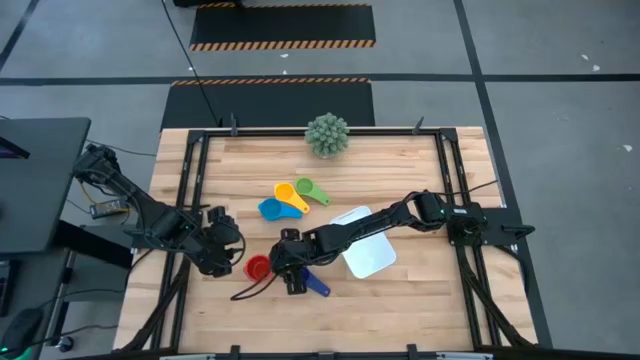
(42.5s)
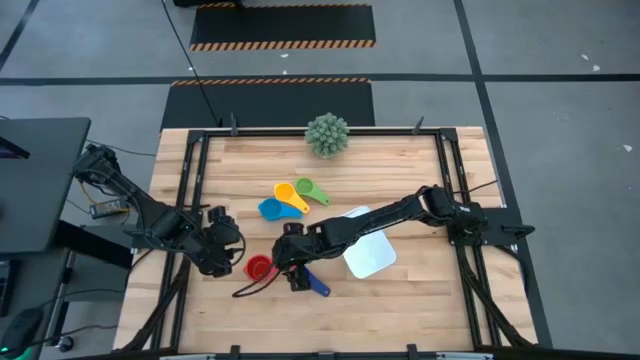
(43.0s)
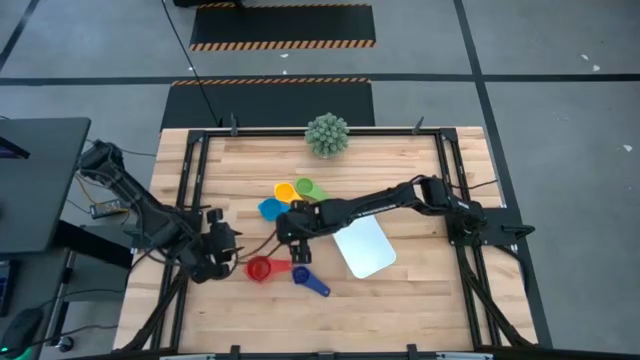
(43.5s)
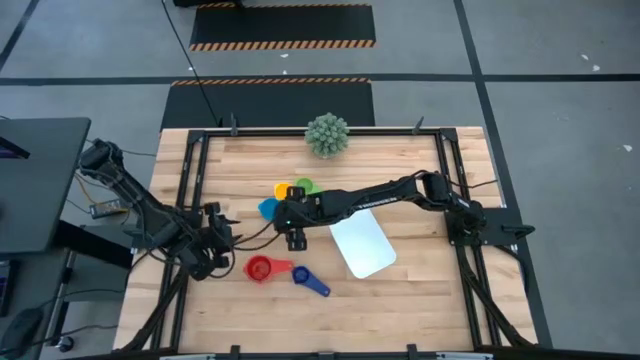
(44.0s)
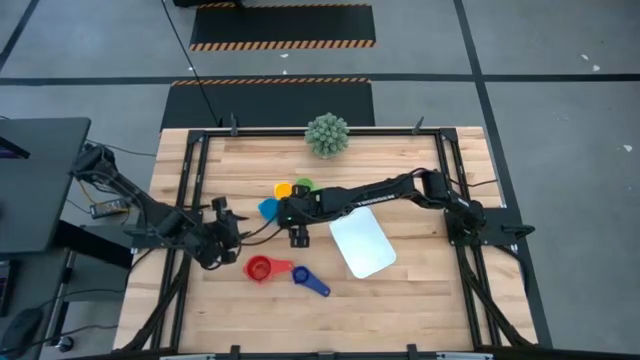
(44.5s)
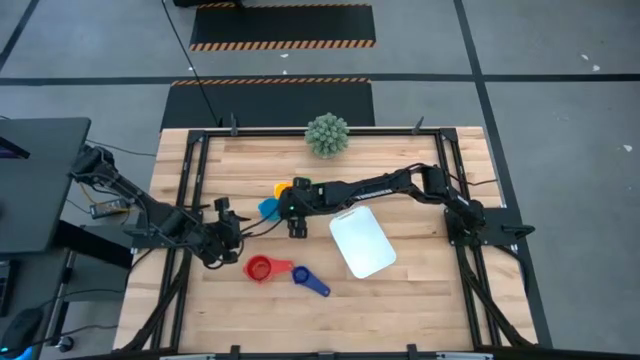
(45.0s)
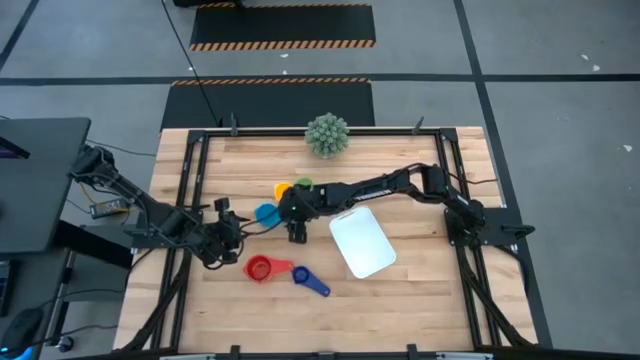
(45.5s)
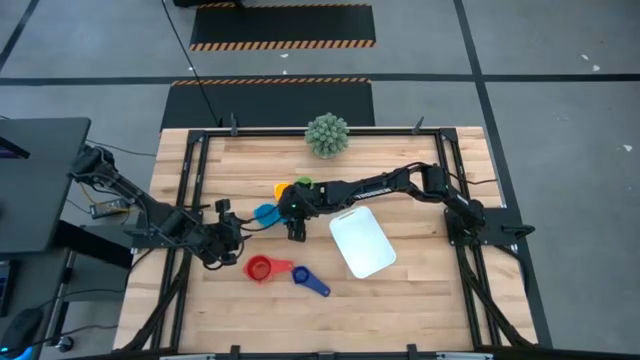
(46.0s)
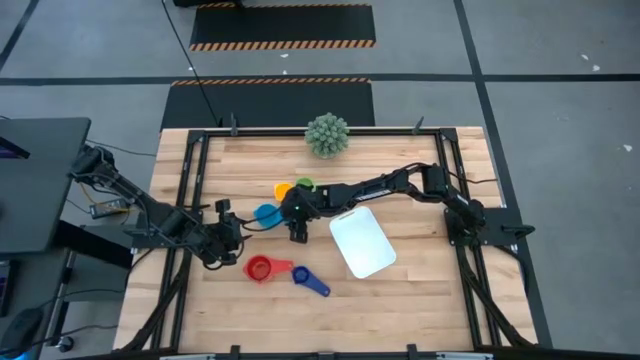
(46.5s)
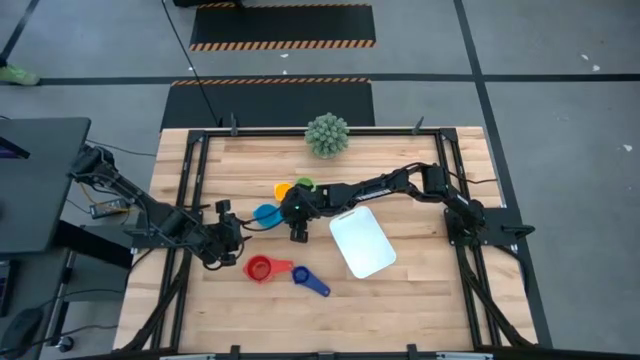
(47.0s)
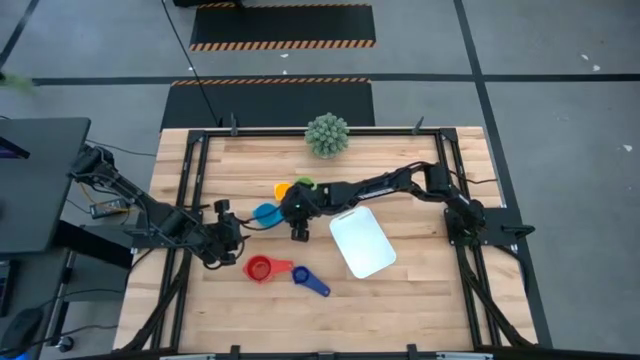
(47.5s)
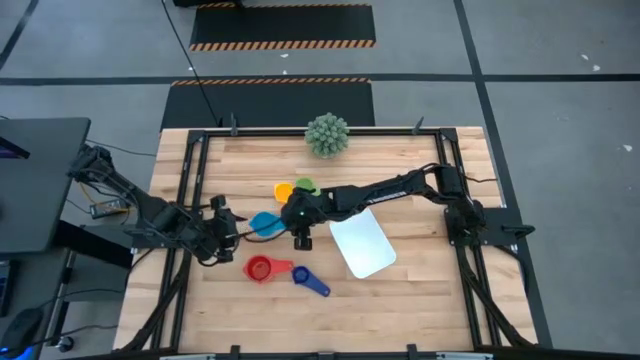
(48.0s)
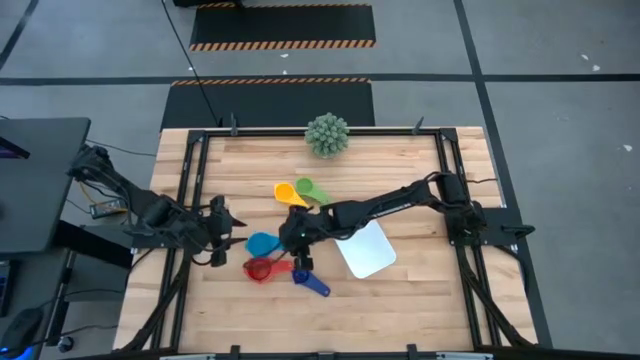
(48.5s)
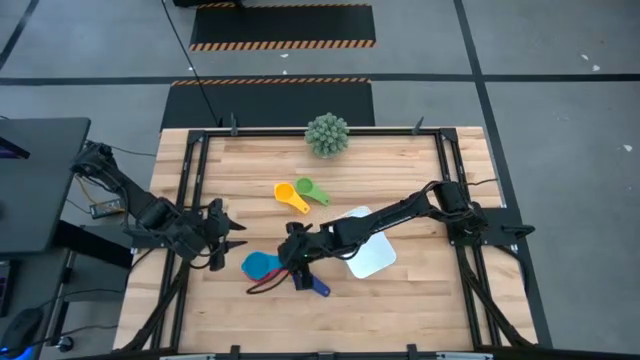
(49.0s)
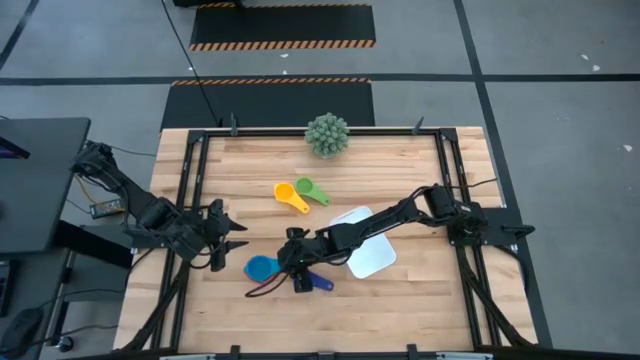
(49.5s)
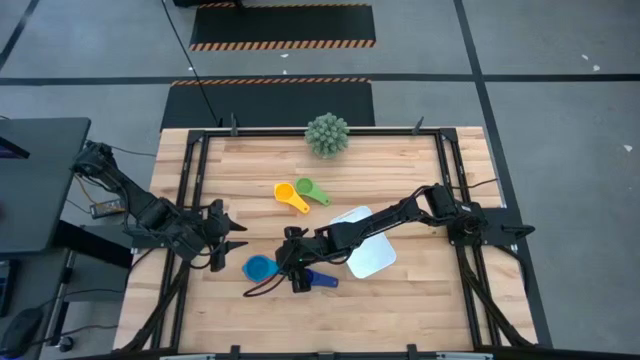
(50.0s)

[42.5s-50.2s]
Task: Nest measuring cups in basket
Stack the light blue measuring cup on top of the red measuring cup

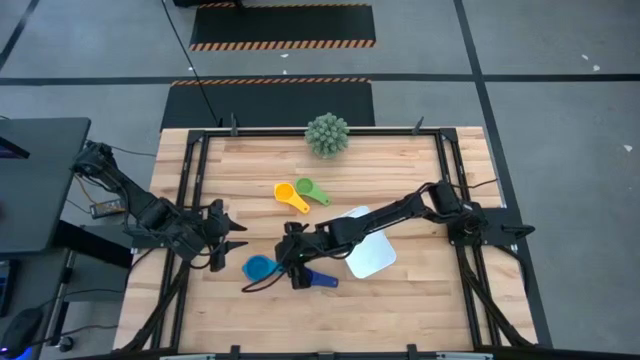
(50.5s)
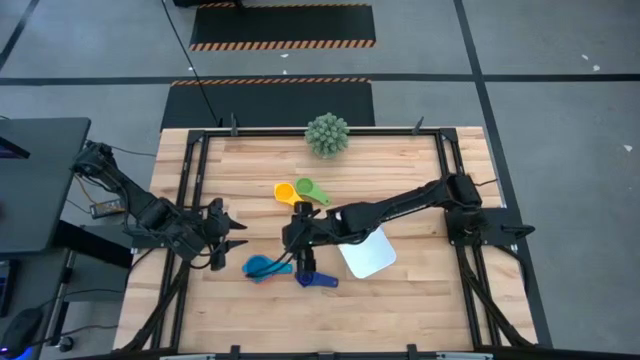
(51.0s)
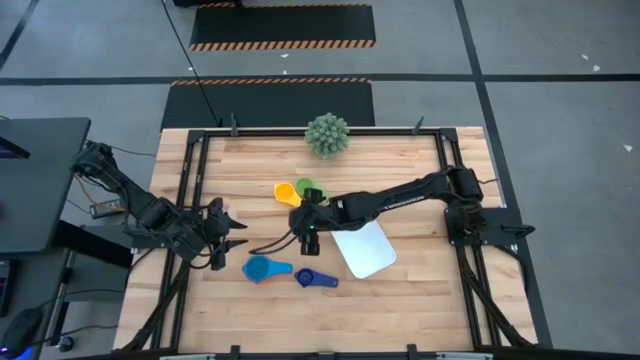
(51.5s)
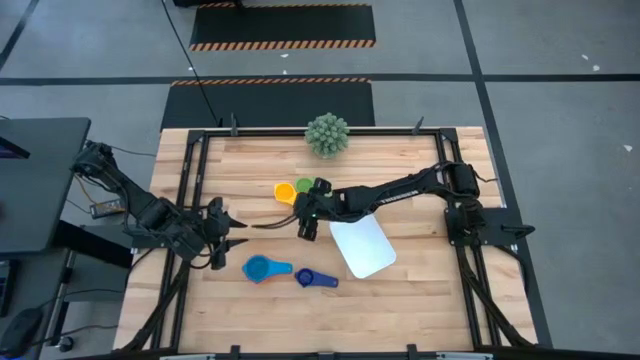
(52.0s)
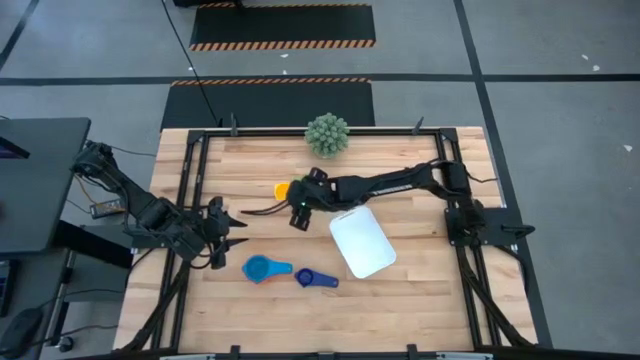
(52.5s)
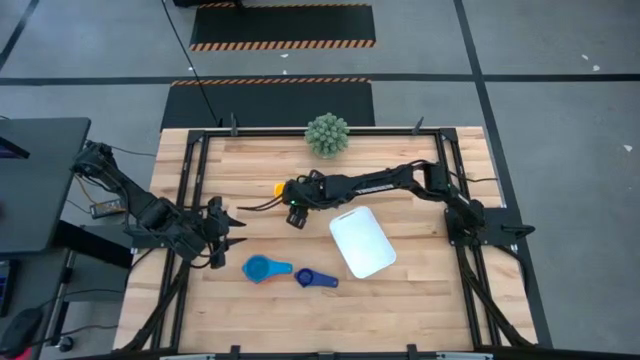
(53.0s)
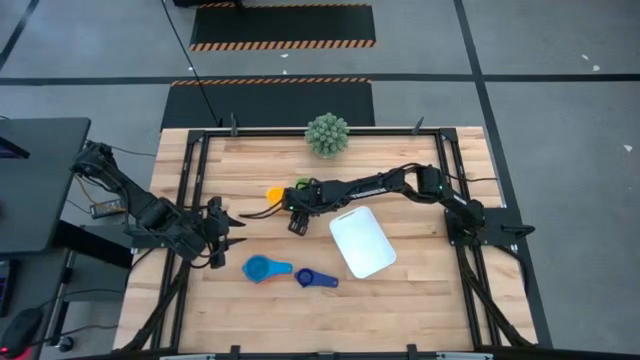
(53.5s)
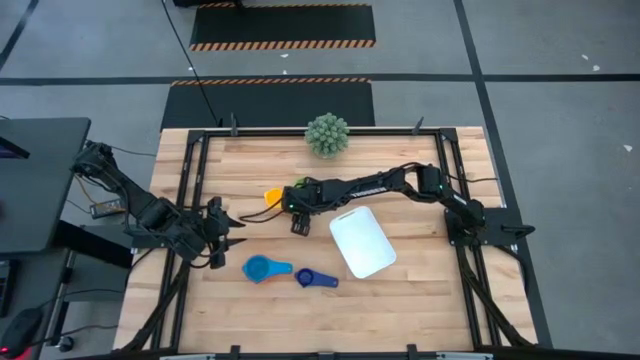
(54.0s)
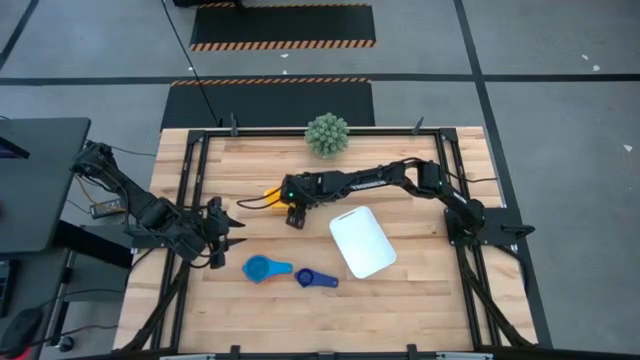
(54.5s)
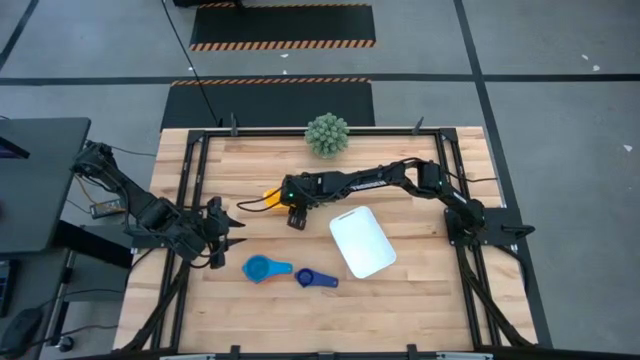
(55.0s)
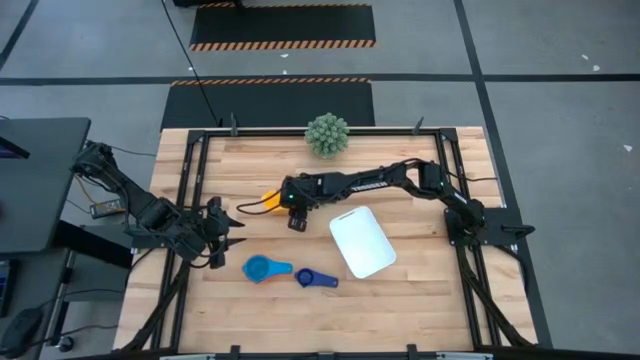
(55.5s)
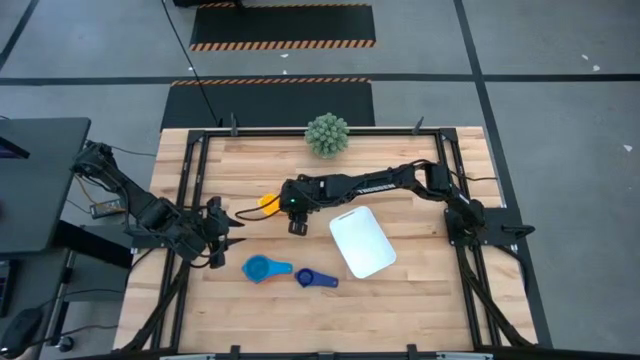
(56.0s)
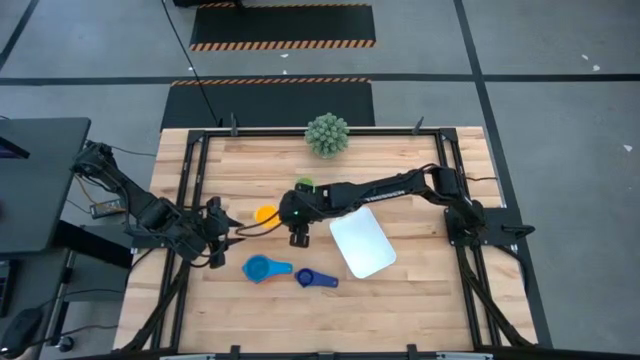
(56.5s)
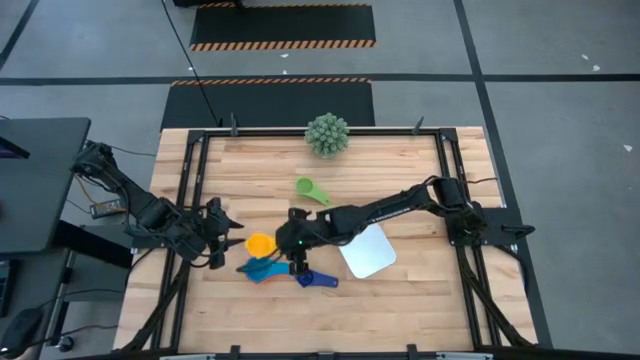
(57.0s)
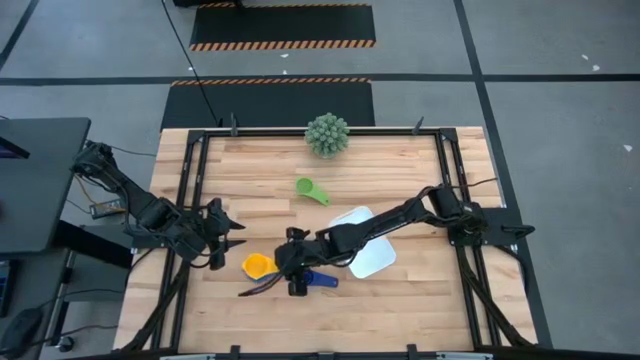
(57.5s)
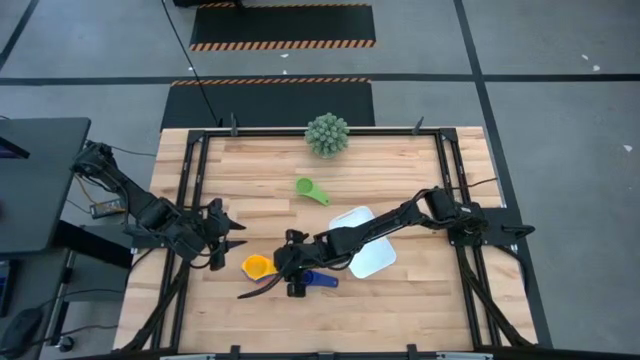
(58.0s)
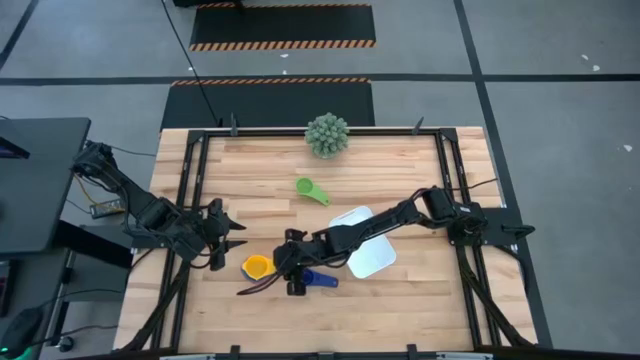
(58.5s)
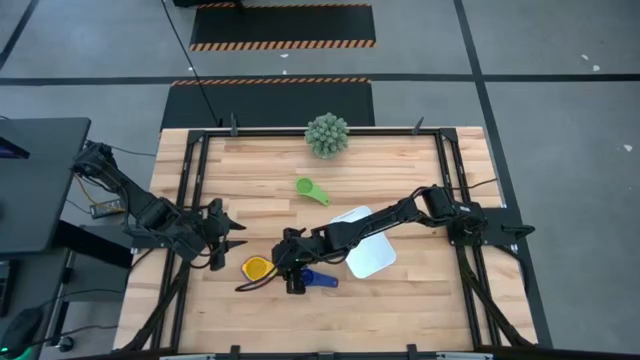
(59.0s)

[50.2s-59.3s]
Stack the yellow measuring cup on top of the light blue measuring cup

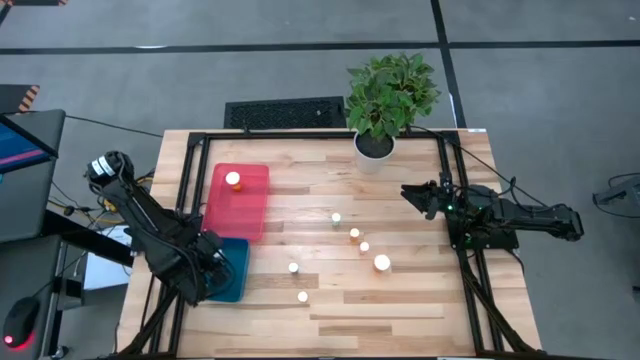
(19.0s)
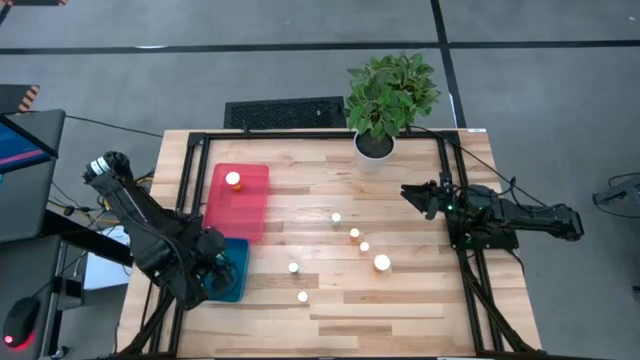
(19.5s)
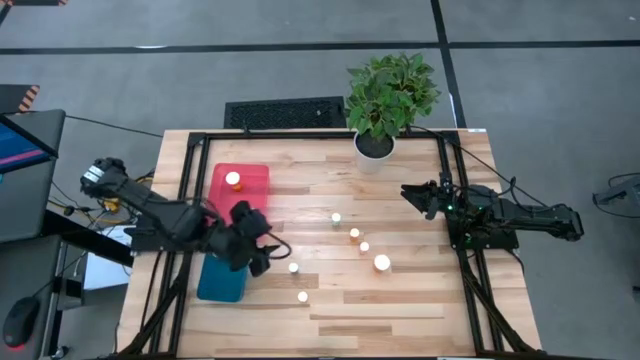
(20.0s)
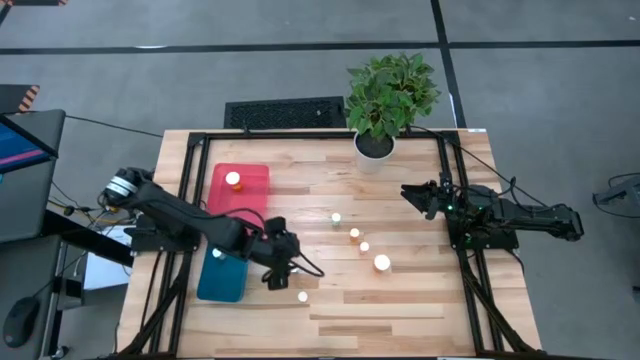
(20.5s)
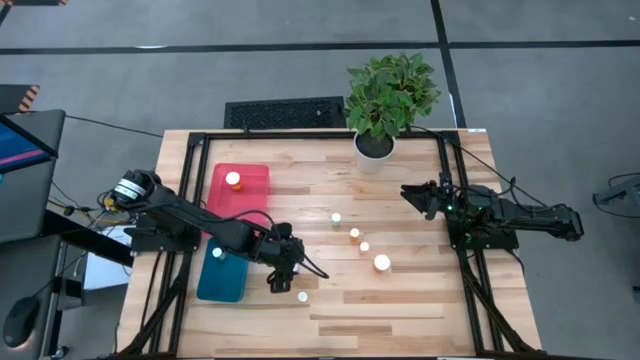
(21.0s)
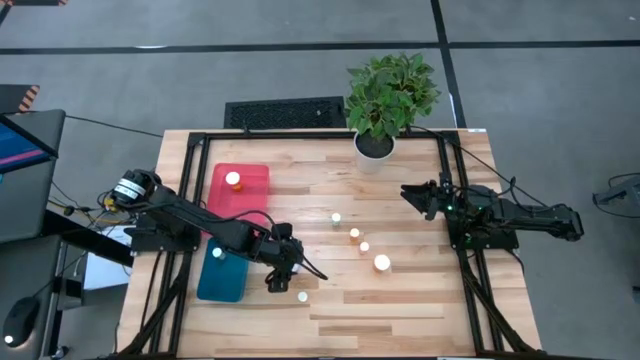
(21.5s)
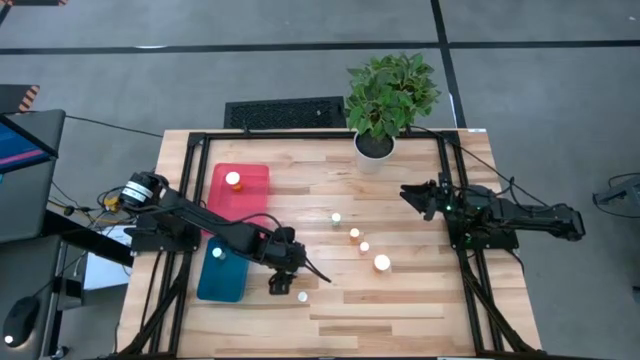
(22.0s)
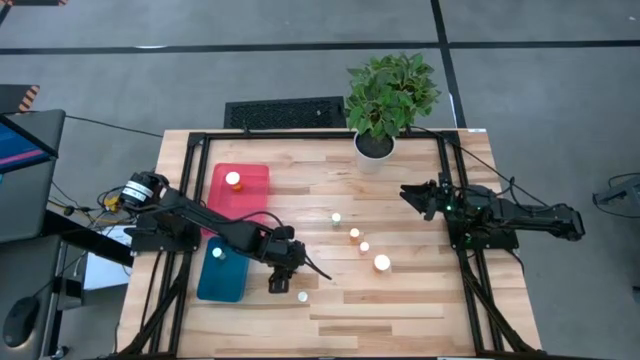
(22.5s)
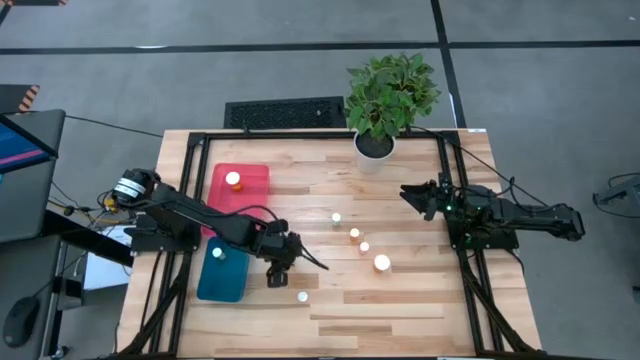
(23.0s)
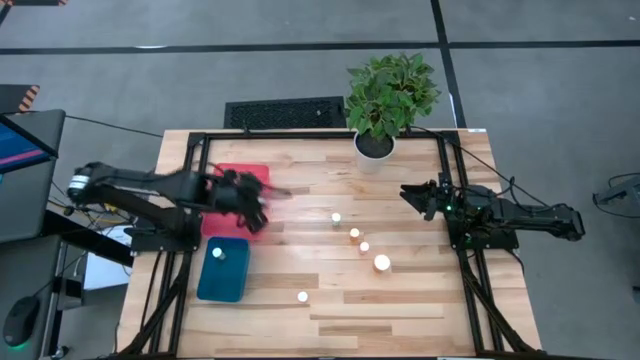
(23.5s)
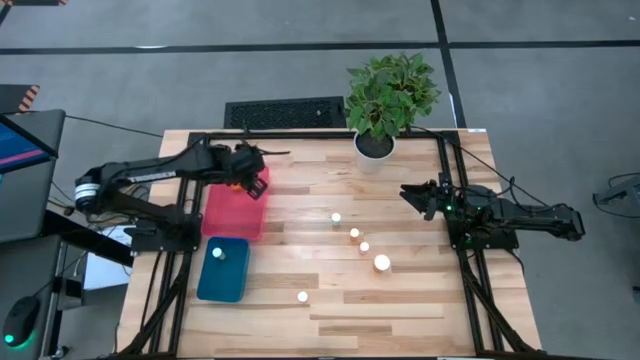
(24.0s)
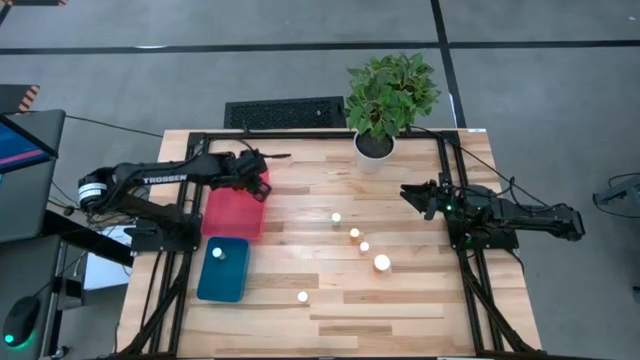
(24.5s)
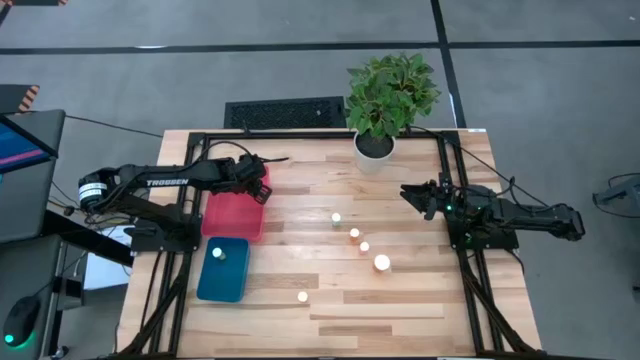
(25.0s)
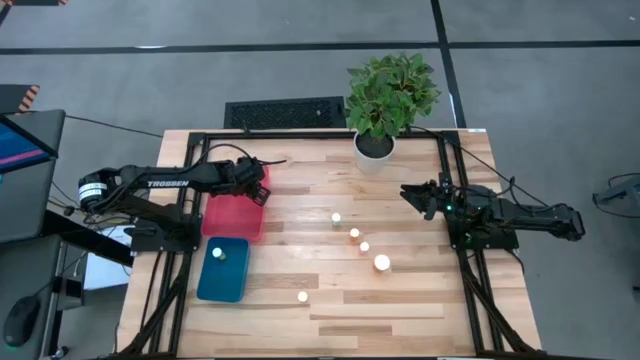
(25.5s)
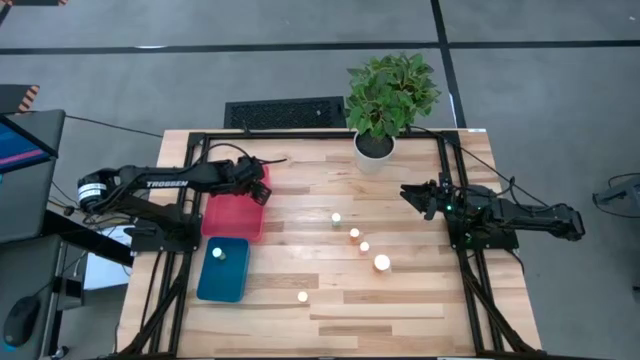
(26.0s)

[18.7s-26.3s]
Task: Pick and place medicine bottles into bin by pill shape (circle, oval)
Put the left blue capsule bottle into the red bin
